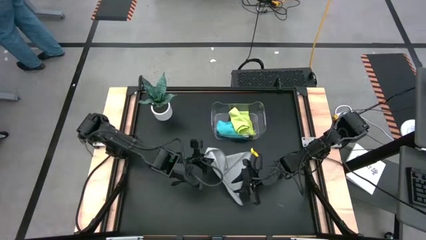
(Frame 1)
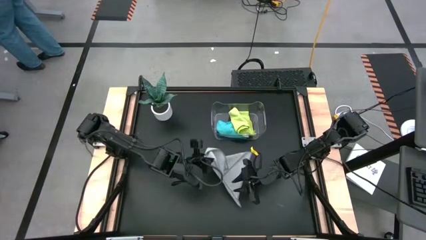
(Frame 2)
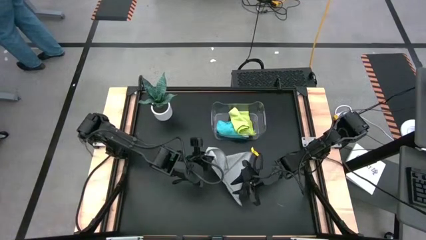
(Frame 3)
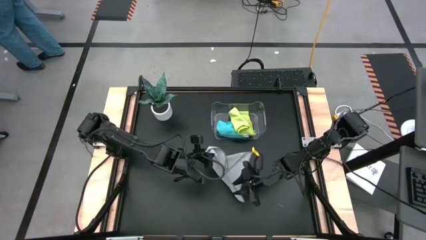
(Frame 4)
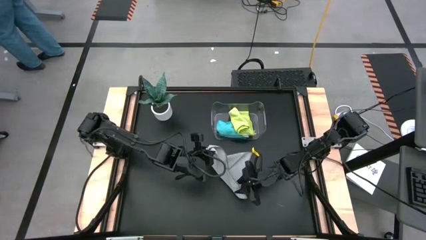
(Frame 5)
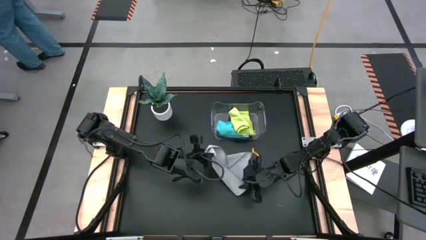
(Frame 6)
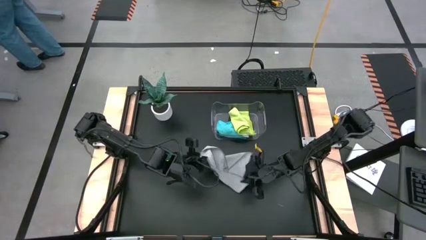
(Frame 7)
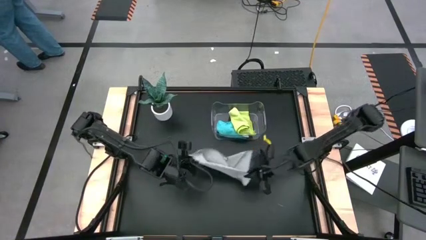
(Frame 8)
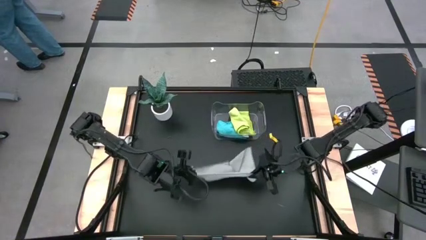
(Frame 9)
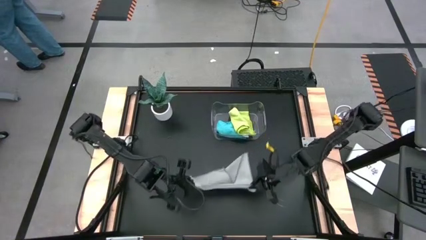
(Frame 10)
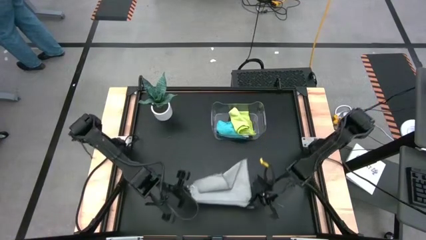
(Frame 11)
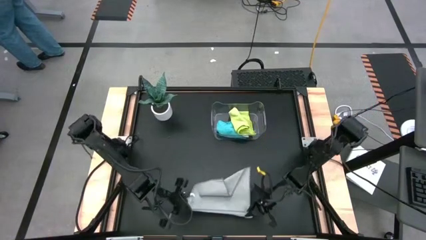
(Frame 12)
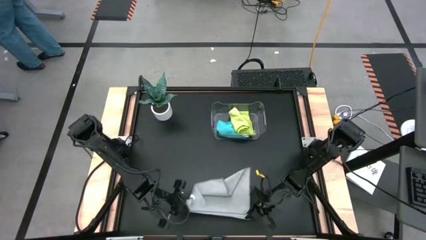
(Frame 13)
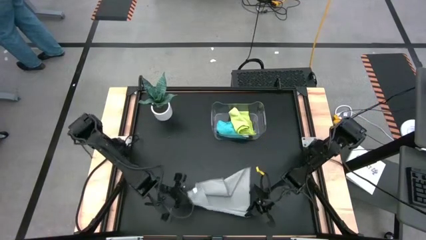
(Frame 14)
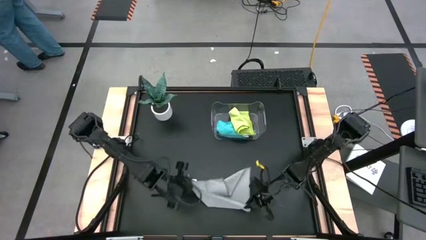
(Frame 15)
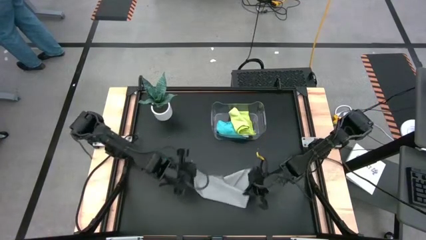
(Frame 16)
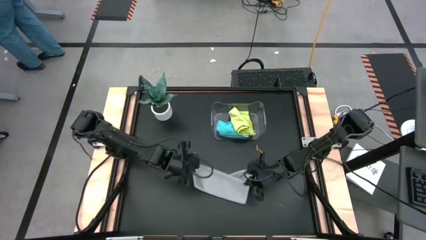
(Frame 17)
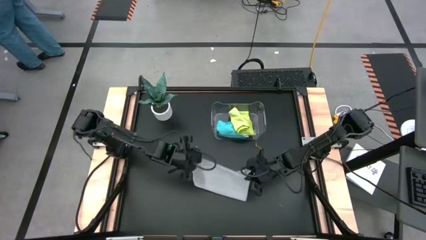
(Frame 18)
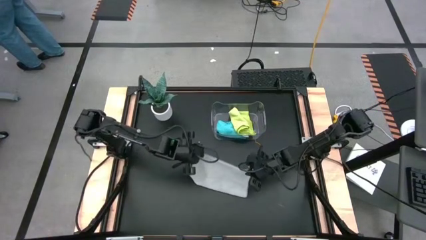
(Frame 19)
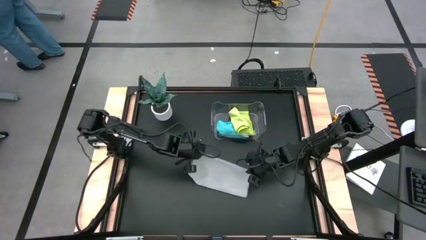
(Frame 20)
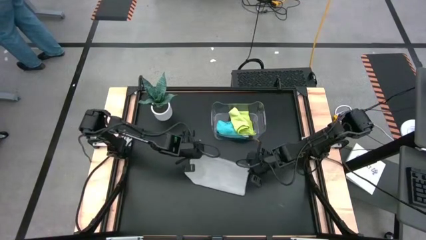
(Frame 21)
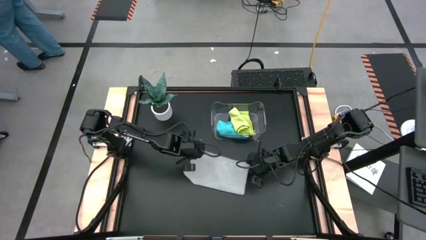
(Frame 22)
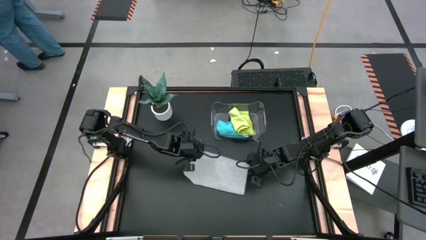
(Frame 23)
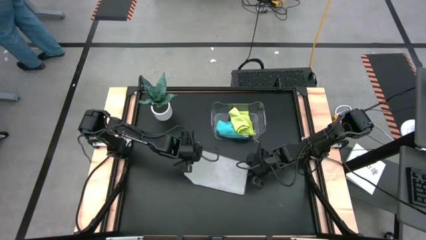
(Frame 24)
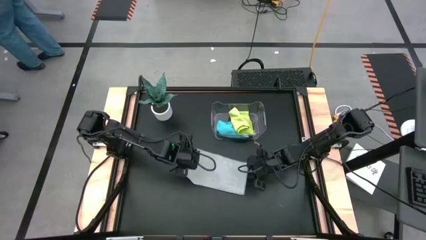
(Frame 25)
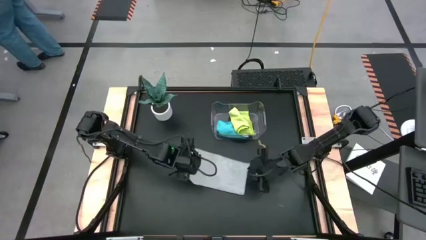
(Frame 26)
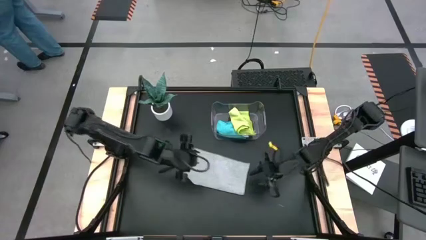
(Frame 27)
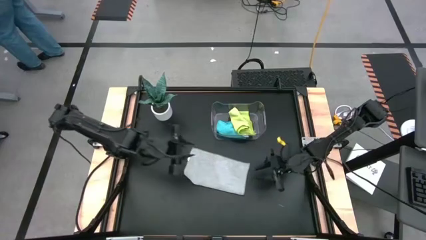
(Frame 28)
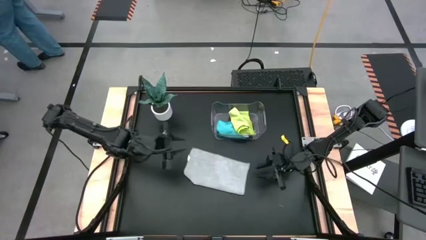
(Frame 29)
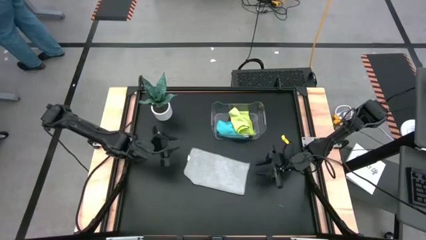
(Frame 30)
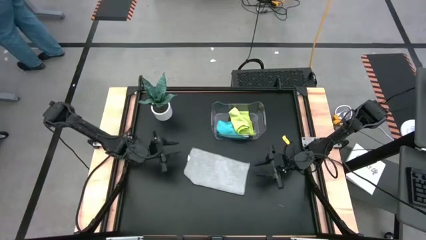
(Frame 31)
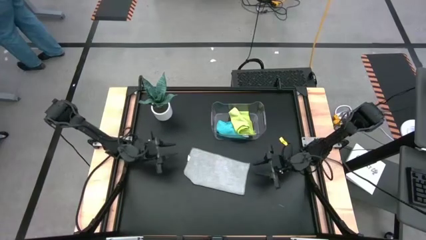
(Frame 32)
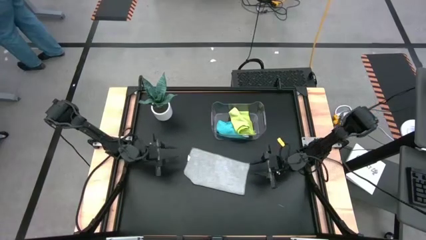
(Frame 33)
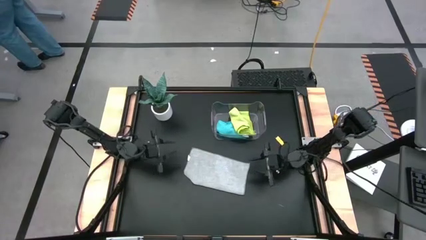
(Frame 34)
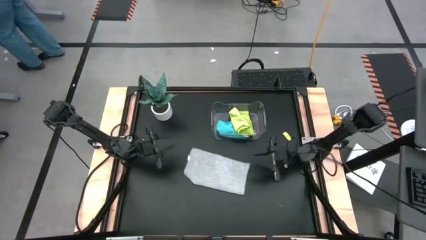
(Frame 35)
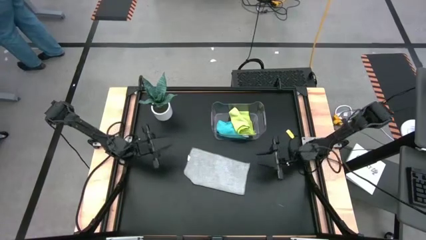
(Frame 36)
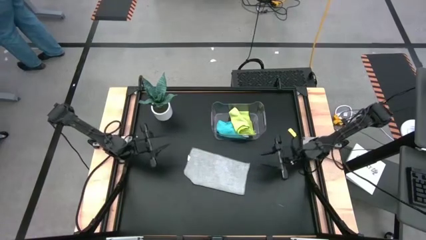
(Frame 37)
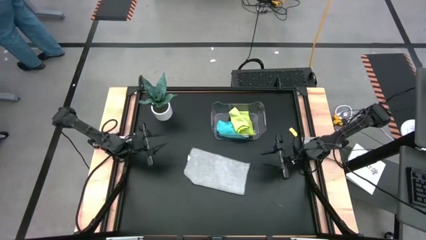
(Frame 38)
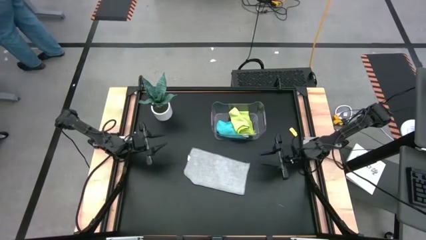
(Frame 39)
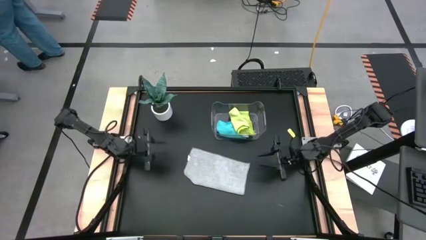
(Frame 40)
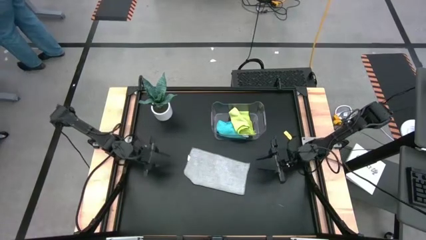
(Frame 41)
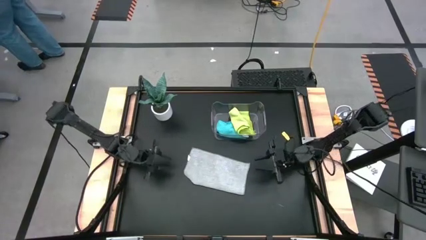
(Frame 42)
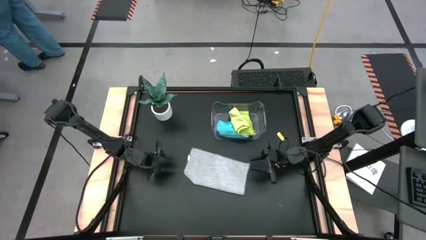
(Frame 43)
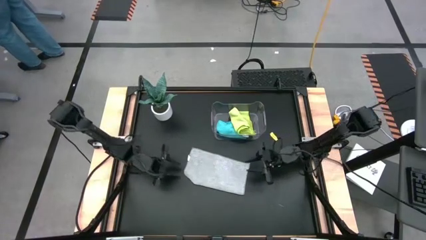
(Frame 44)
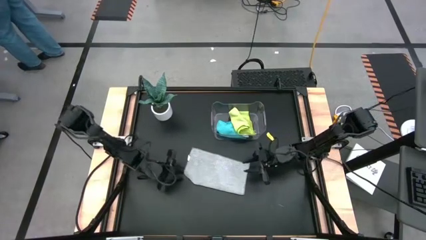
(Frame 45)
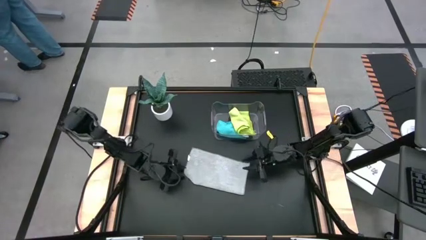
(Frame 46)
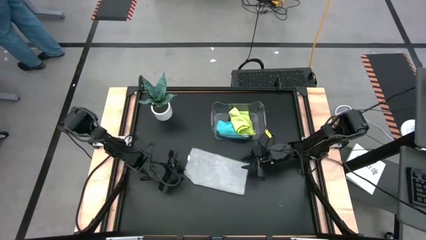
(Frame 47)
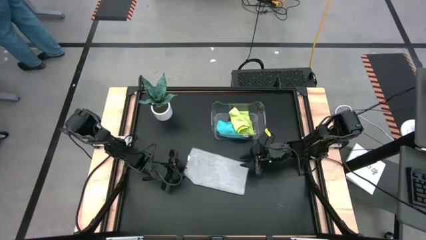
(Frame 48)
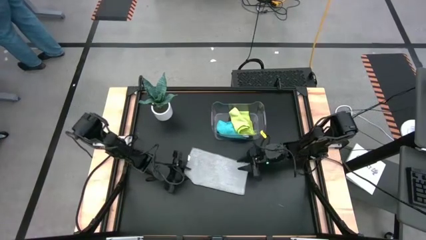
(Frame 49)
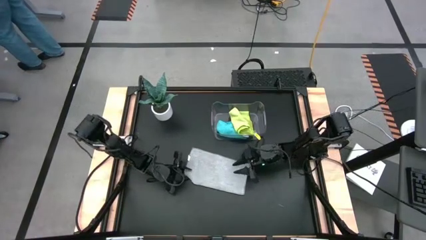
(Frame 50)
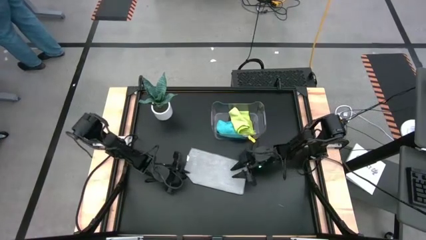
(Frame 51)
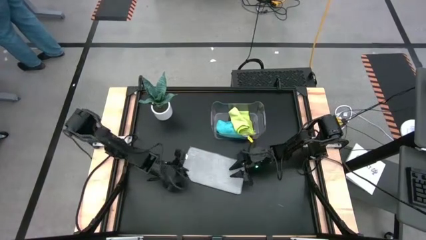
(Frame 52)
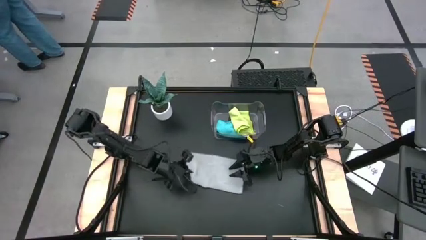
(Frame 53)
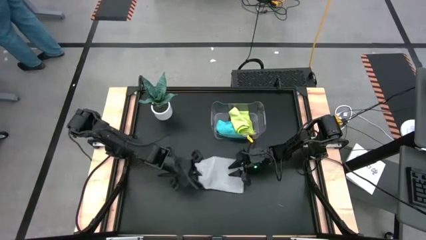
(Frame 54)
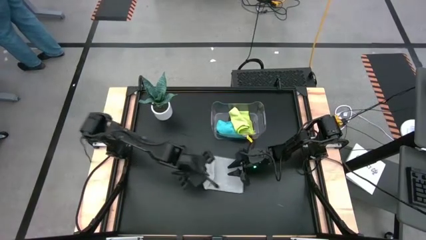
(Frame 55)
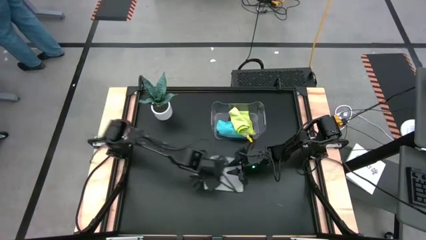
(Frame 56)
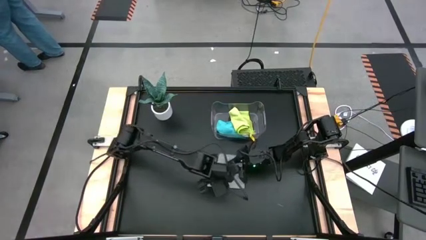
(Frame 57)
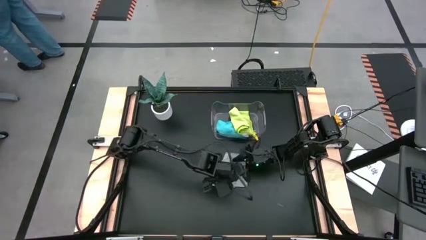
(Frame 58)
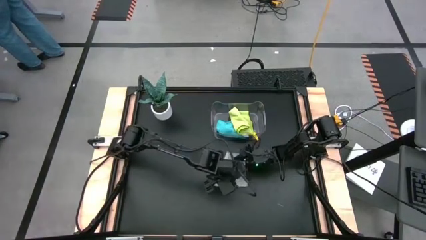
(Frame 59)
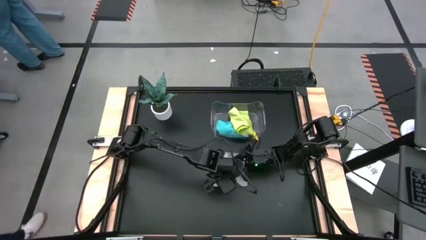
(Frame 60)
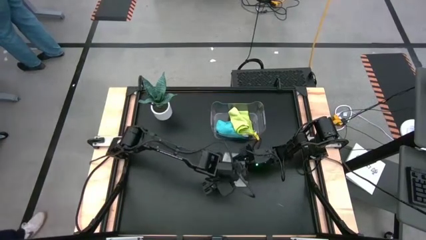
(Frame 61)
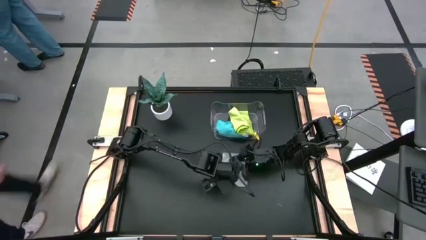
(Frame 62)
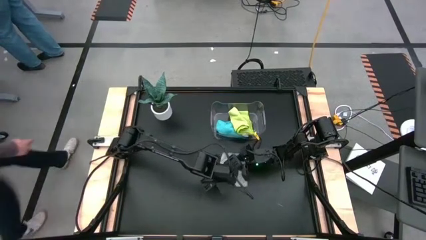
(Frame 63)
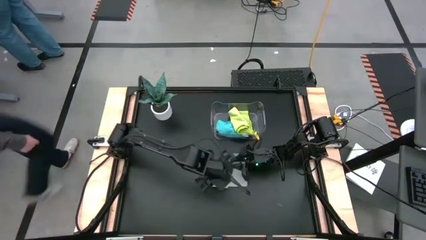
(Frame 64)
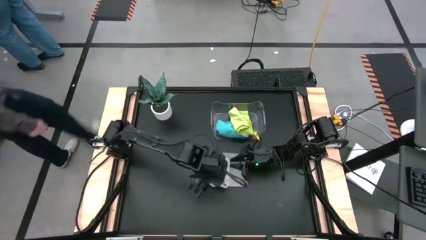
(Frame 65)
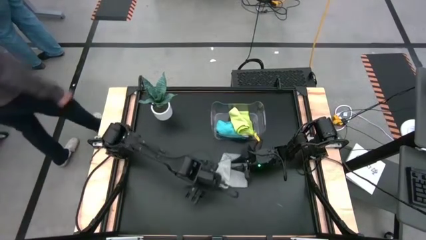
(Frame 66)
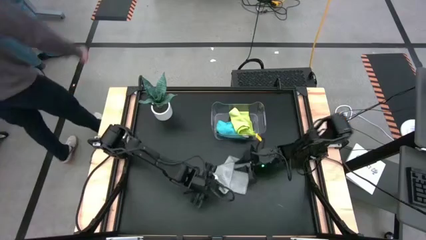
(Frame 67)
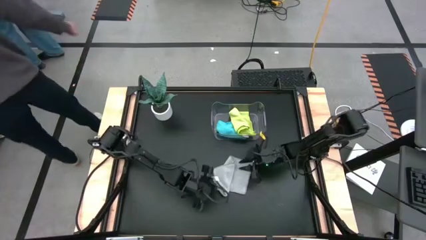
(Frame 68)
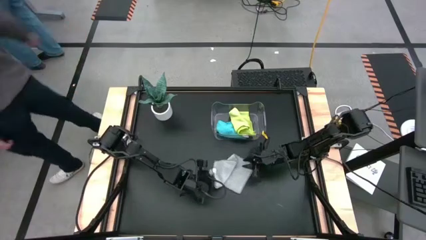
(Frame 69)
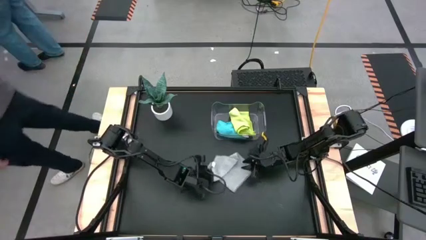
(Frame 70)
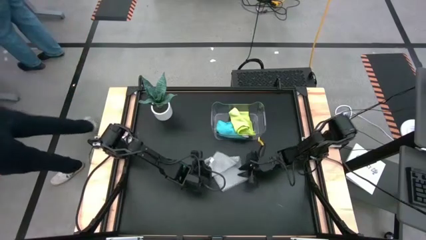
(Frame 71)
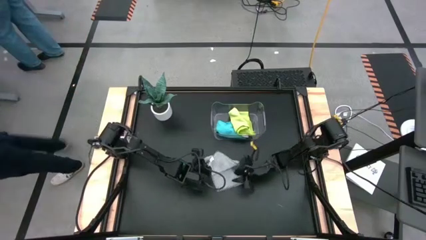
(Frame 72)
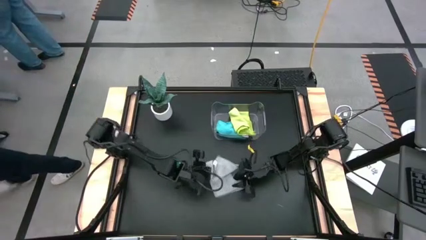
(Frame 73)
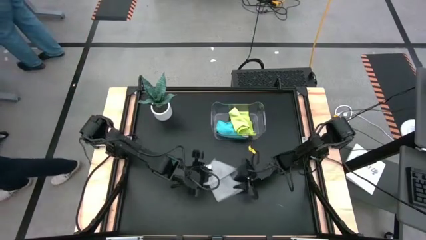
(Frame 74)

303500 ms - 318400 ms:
Task: Fold microfiber towels
Fold the gray towel
